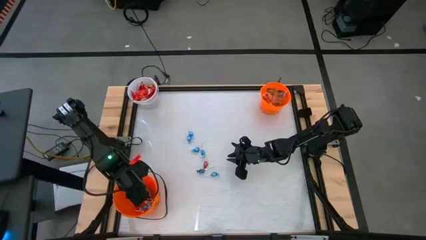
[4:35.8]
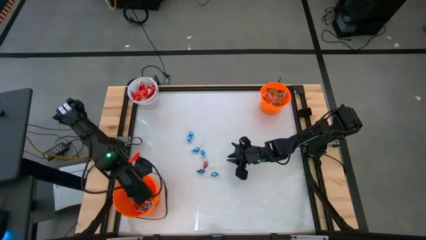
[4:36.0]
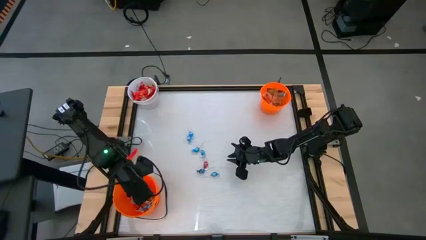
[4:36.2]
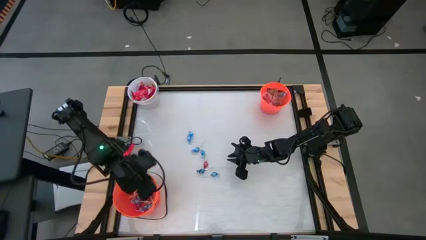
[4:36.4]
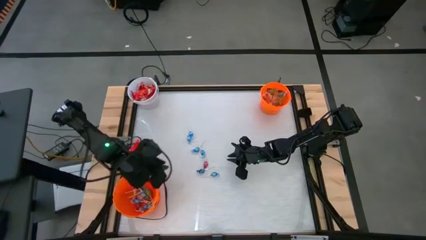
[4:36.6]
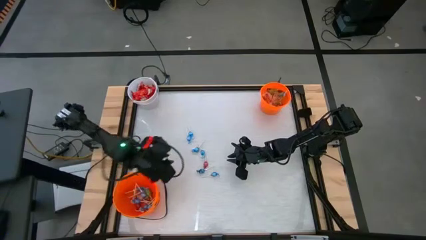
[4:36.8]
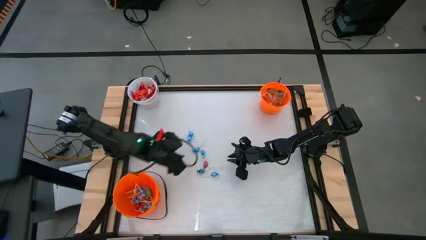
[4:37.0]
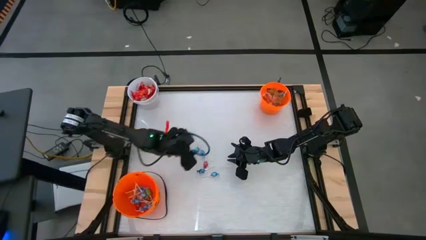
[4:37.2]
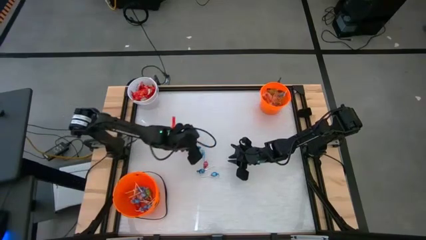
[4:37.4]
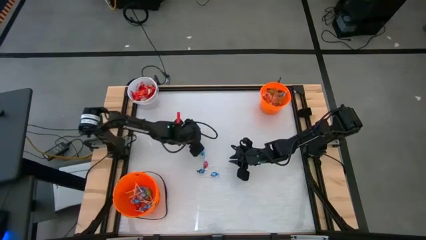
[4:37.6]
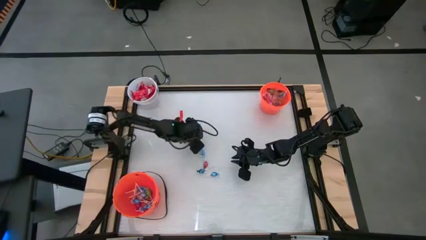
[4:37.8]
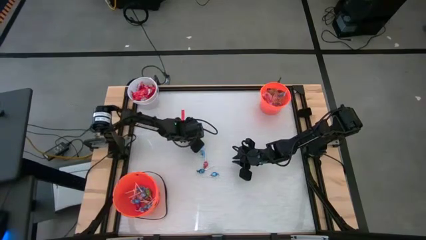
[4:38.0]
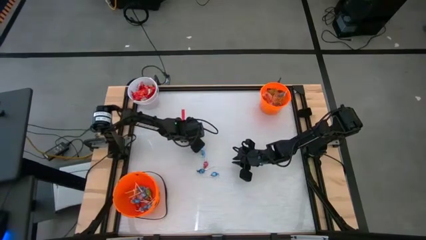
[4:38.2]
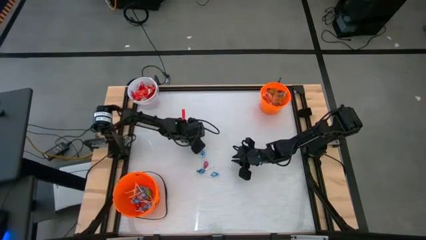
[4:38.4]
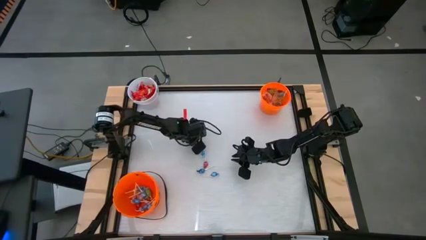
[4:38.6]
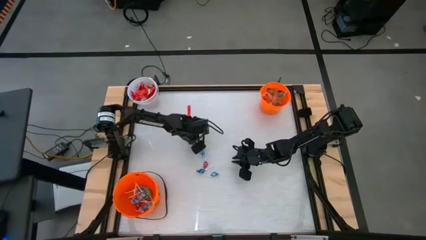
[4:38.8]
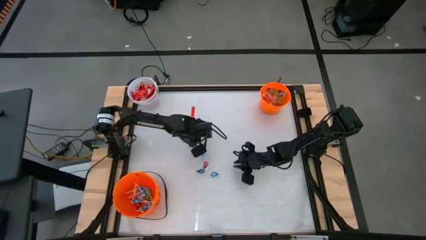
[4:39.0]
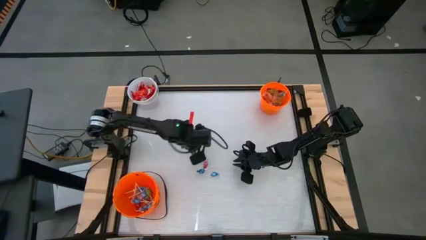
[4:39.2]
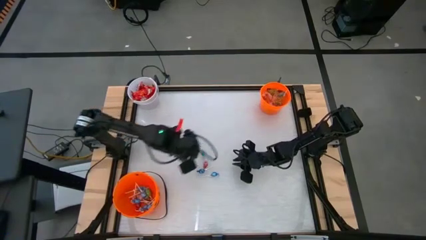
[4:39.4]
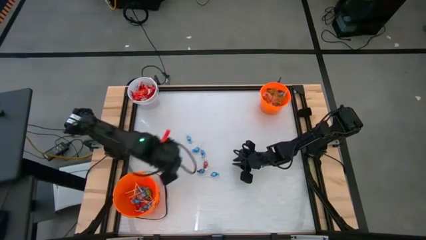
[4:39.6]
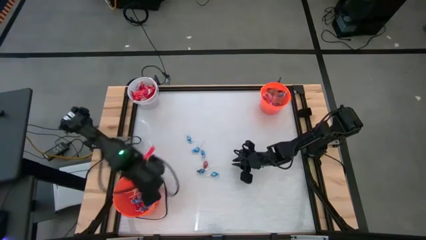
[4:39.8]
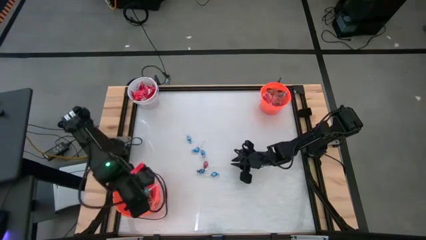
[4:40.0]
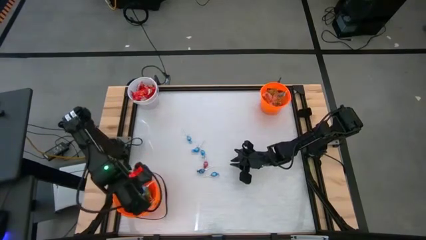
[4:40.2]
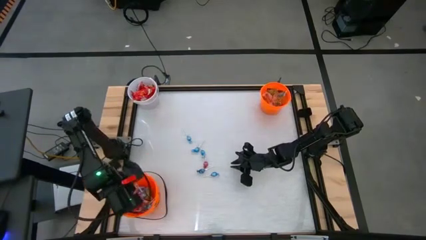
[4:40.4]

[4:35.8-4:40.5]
Task: Sort candy by brand, put in halloween buckets
Put the blue lollipop into the bottom orange bucket

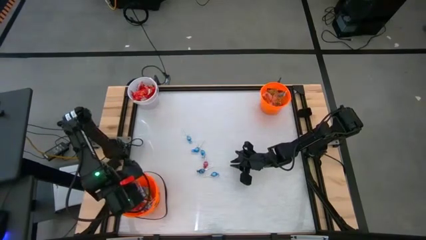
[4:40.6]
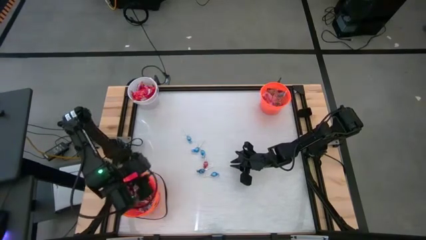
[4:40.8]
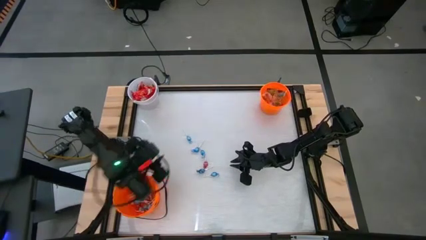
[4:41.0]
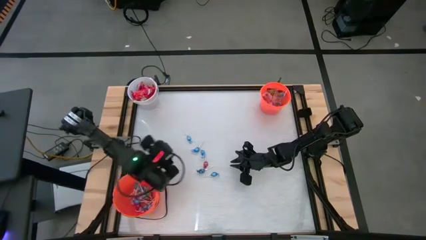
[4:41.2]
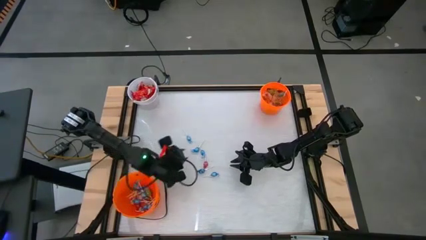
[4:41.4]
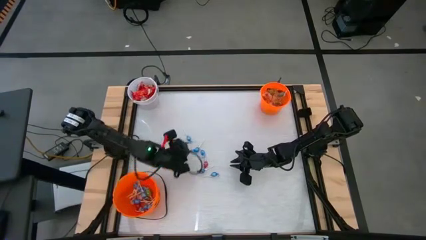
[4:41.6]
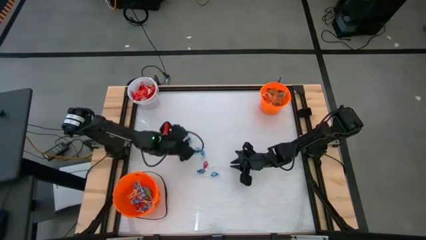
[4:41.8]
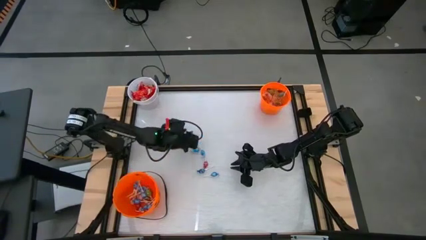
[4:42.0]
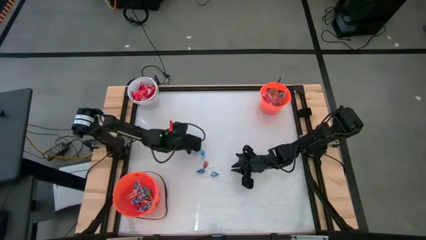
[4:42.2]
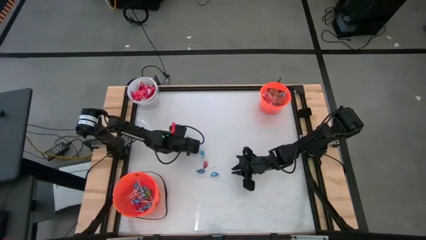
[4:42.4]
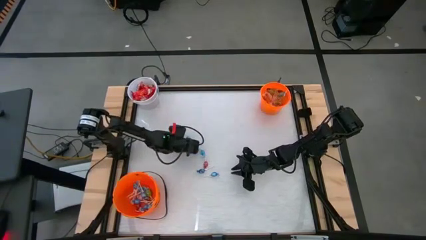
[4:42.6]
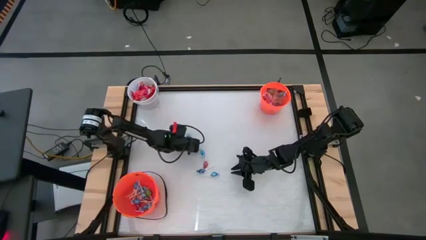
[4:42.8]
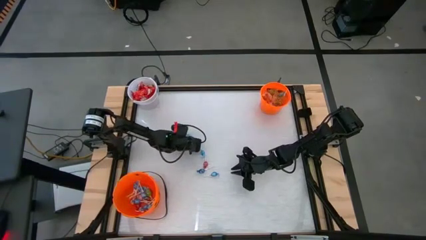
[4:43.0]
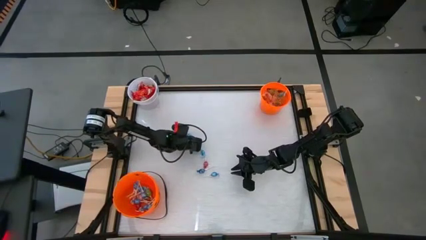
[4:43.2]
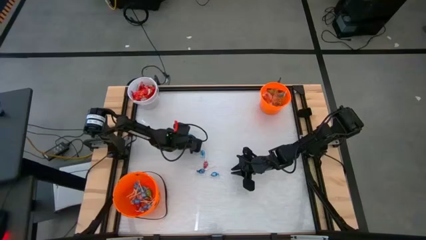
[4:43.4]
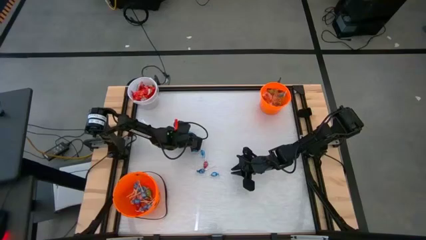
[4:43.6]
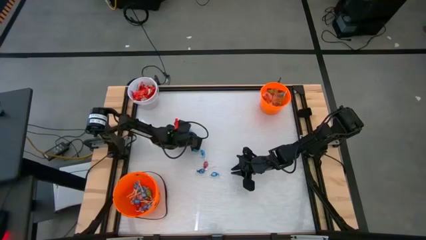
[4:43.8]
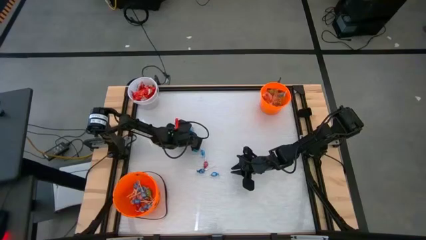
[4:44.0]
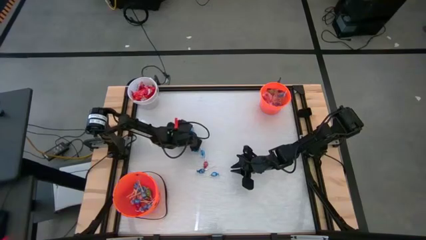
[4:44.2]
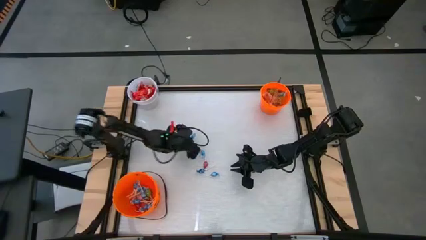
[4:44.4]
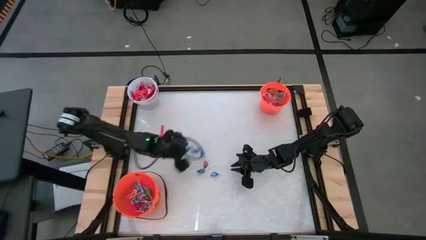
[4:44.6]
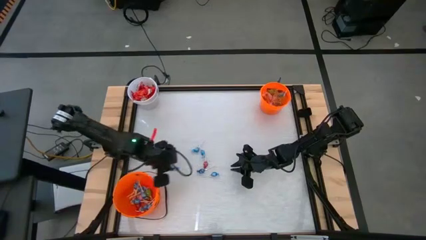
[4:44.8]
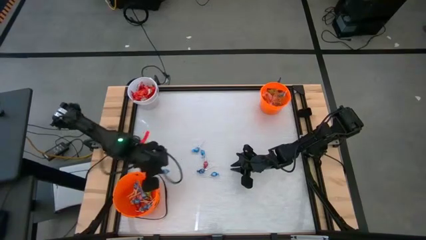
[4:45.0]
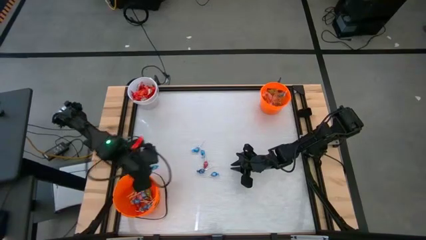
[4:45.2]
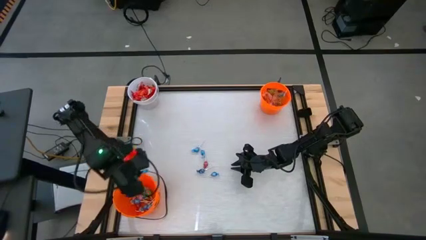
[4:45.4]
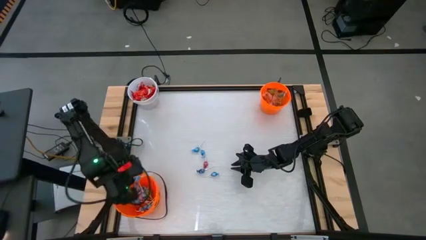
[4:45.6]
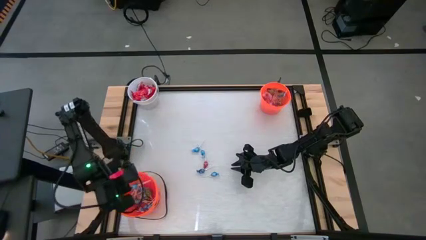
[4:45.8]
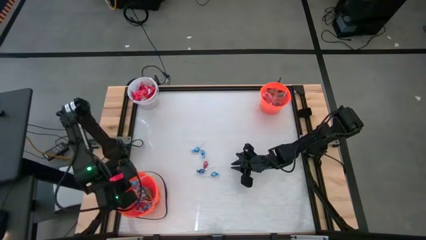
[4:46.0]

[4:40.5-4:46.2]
Put the blue lollipop into the bottom orange bucket

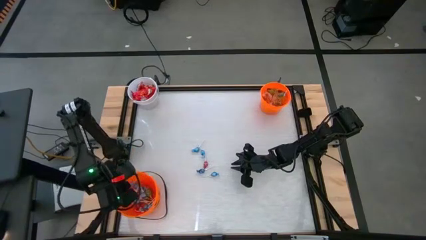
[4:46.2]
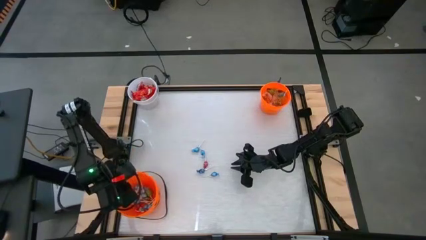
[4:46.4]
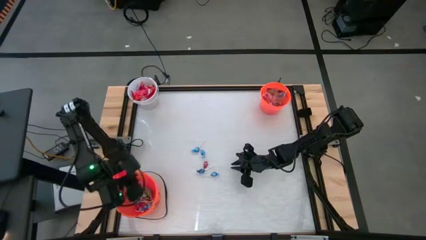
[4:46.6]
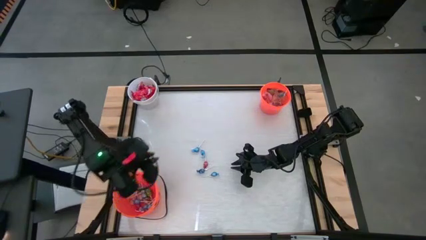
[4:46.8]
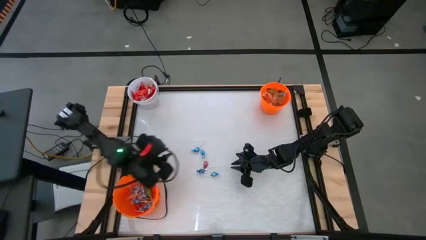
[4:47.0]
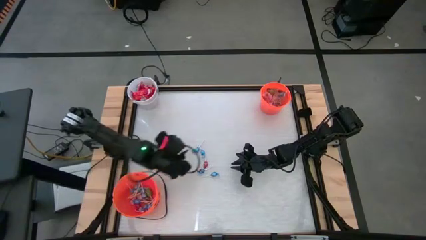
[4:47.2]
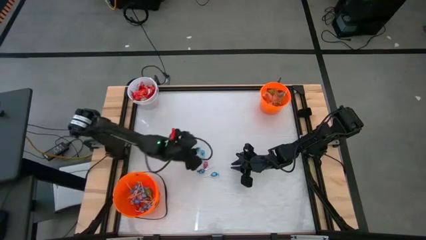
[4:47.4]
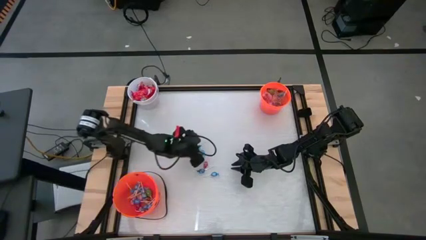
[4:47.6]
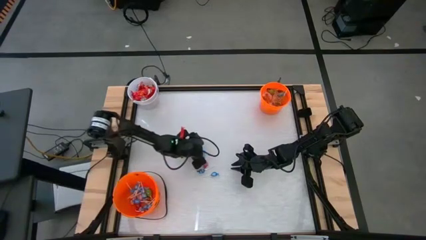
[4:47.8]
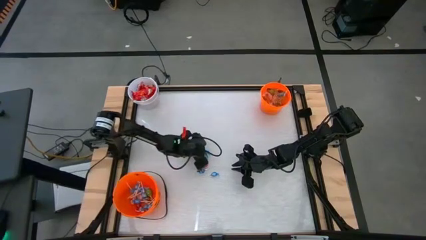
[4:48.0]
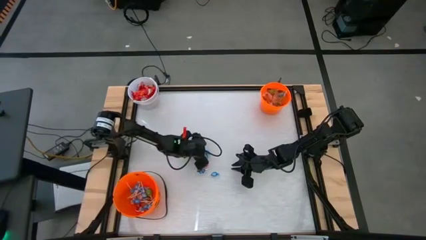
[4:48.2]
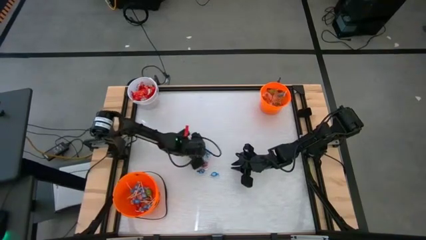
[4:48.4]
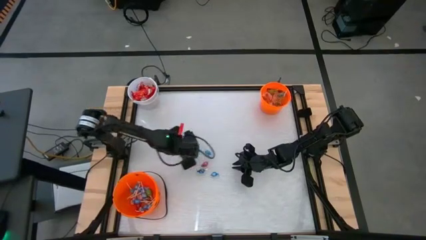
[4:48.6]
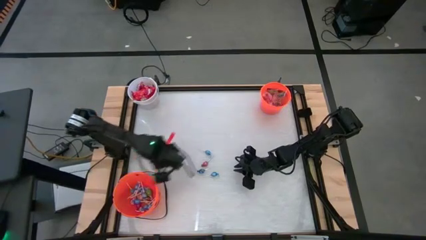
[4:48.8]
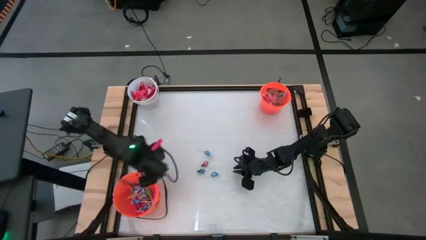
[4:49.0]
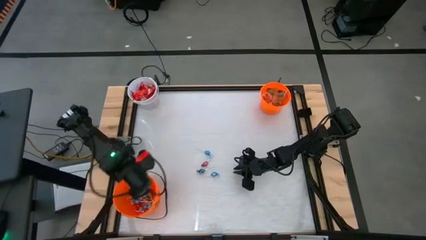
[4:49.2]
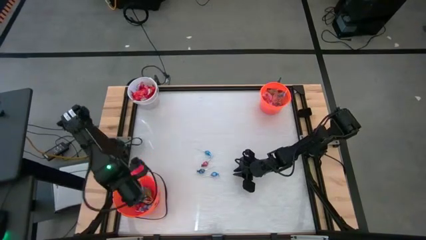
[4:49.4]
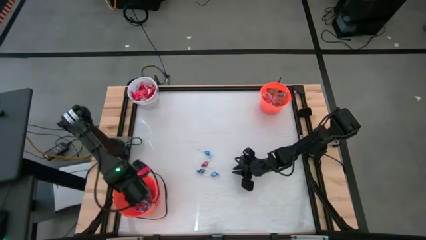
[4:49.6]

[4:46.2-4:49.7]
Put the blue lollipop into the bottom orange bucket

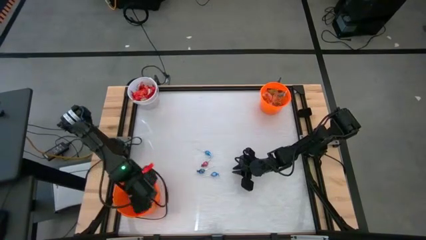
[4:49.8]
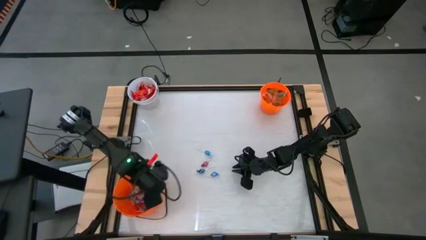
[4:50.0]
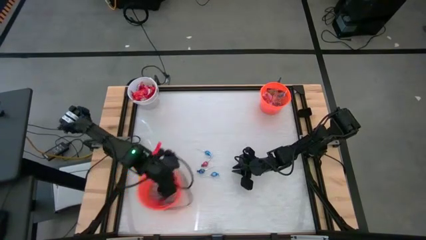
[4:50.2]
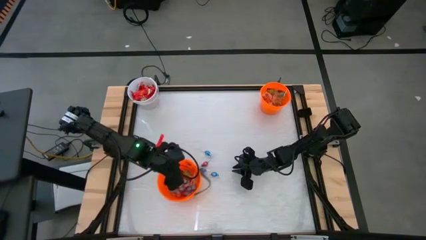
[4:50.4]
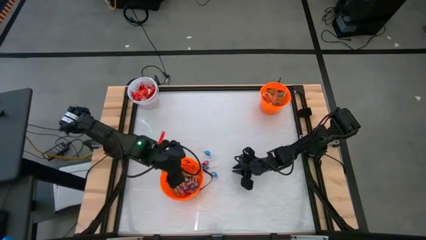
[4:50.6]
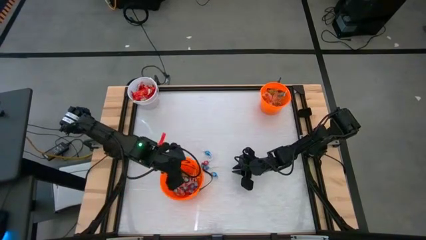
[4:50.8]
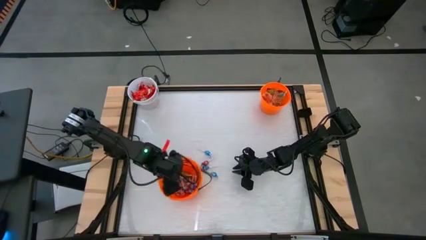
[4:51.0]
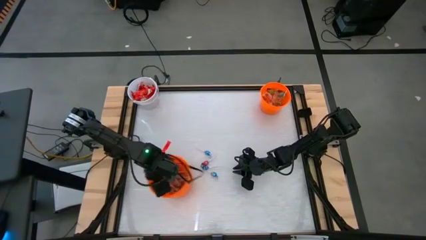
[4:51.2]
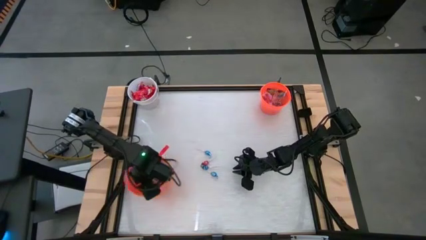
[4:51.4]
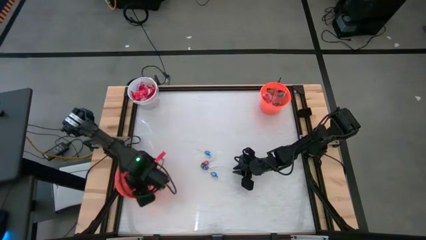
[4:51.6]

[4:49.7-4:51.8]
Move the bottom orange bucket to the left side of the table

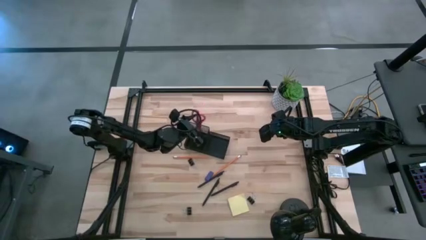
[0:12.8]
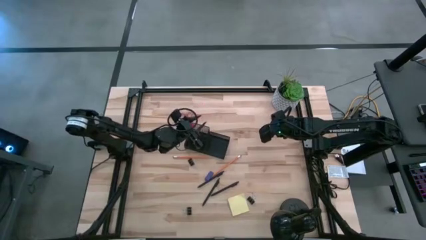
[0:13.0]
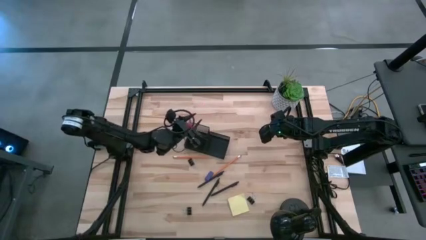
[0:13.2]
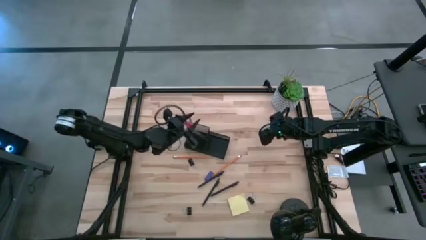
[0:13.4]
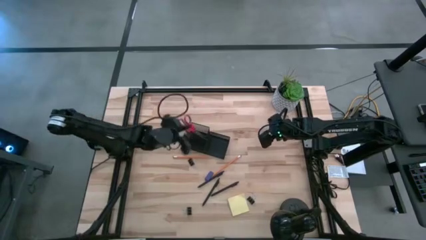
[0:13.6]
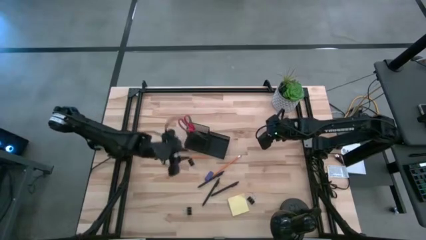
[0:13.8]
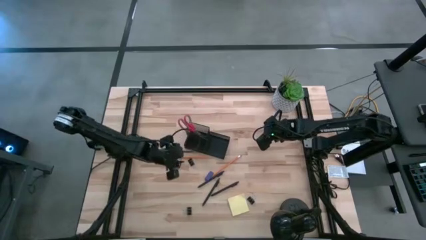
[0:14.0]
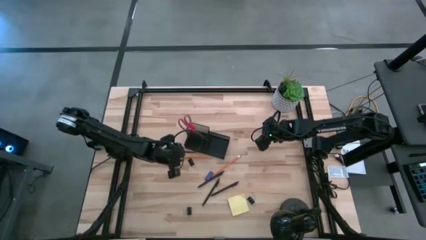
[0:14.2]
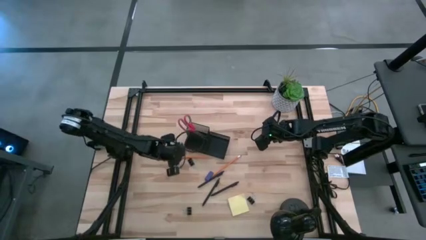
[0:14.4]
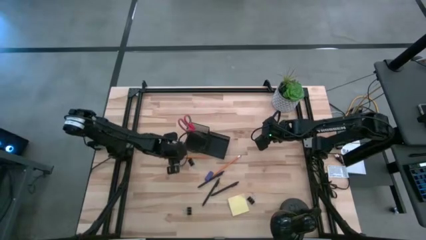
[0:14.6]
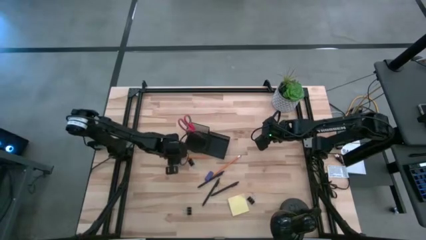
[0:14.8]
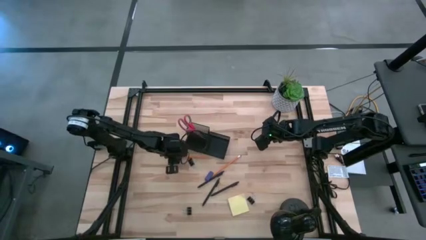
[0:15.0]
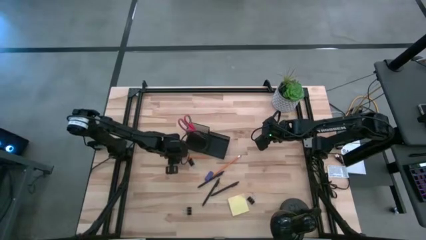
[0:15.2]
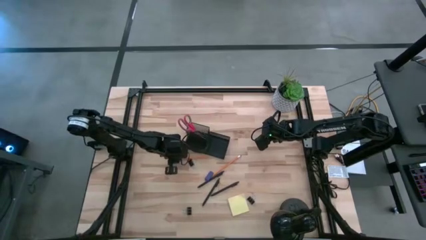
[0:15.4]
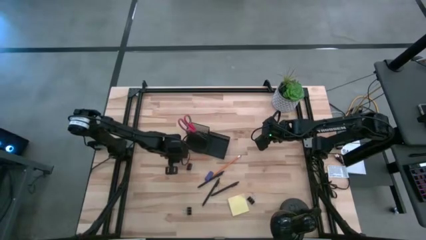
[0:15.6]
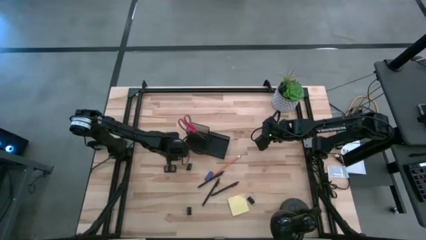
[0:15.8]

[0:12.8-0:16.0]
Task: Pick and place office supplies into organizer
Put the left pencil into the top left section of the desk organizer
